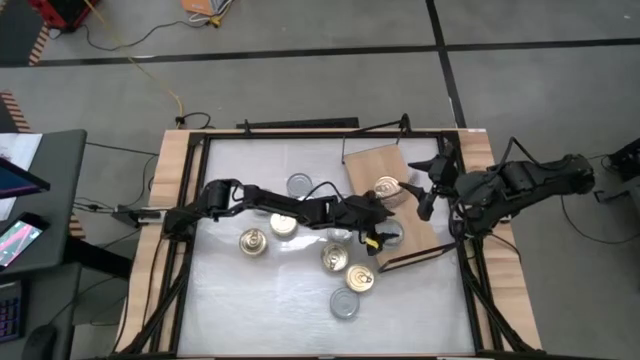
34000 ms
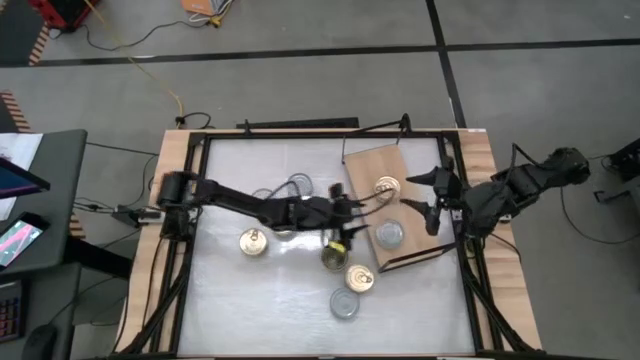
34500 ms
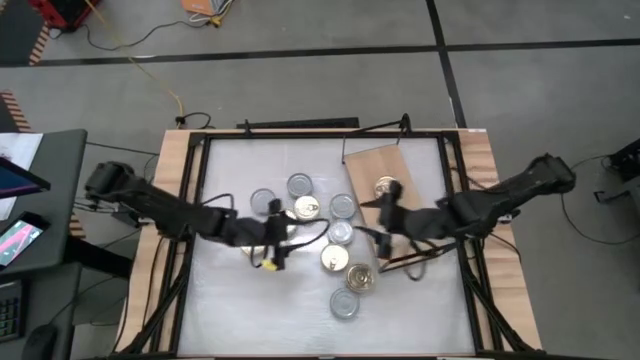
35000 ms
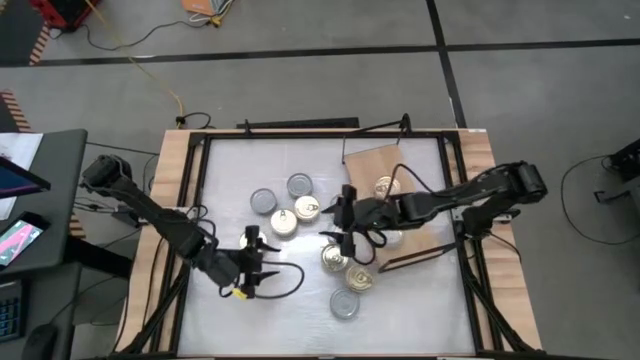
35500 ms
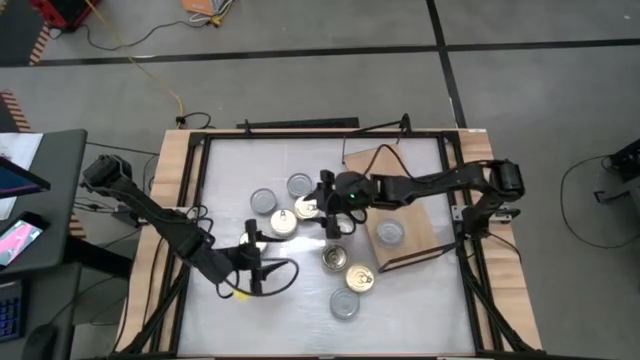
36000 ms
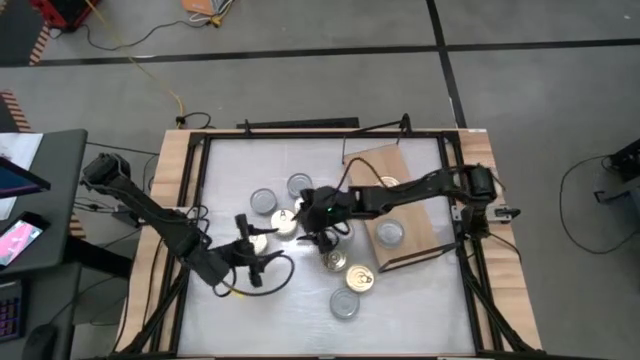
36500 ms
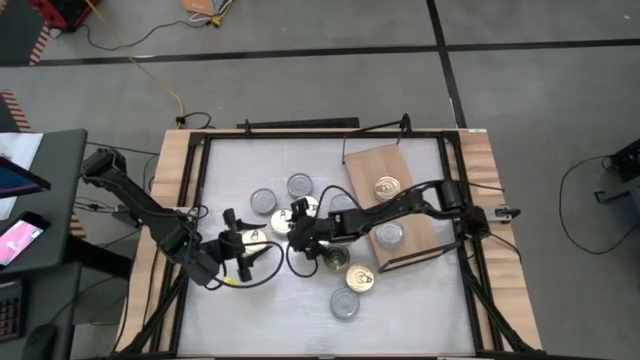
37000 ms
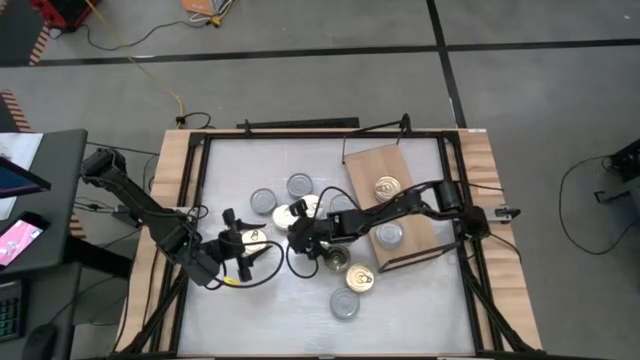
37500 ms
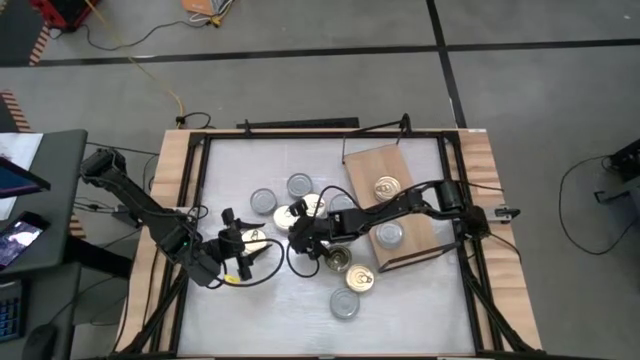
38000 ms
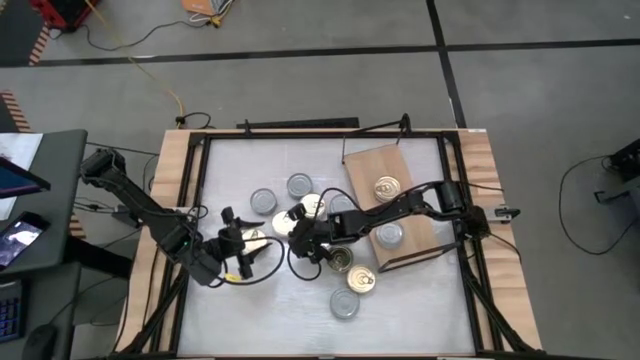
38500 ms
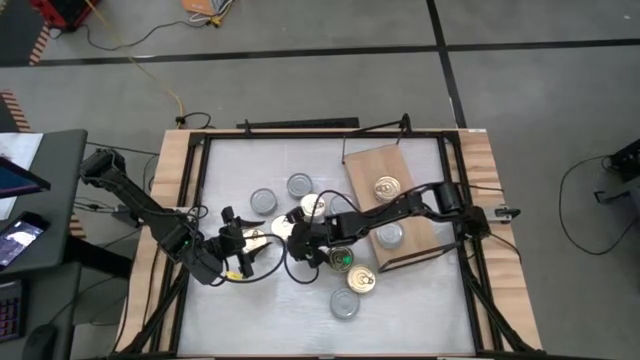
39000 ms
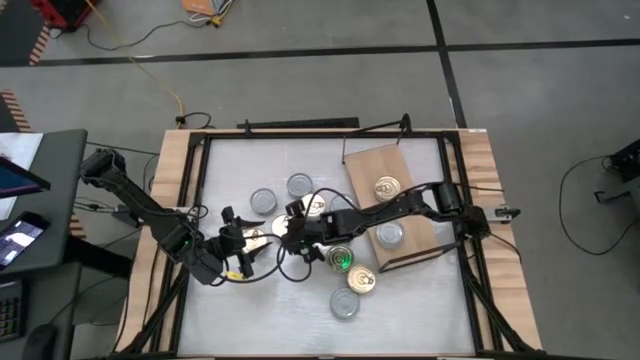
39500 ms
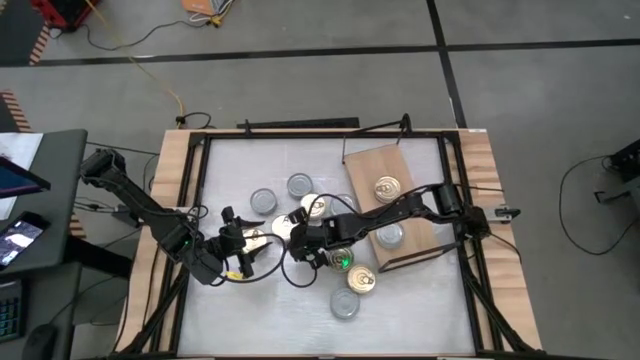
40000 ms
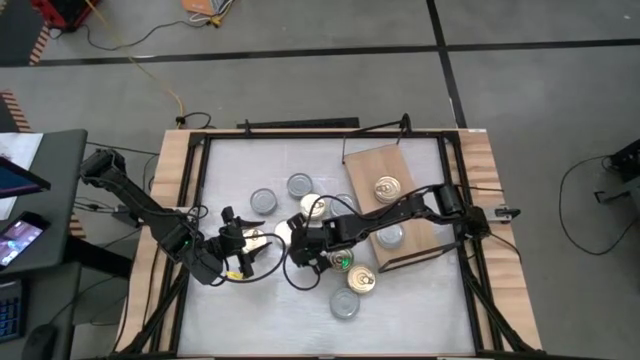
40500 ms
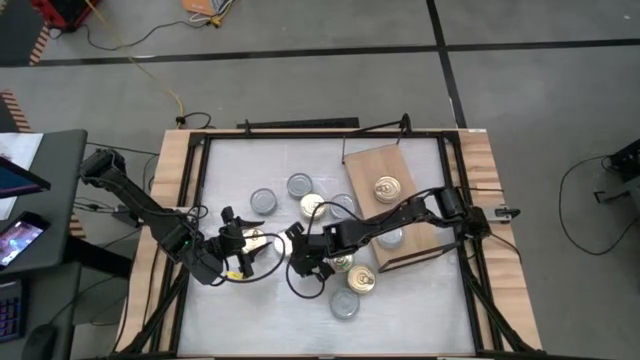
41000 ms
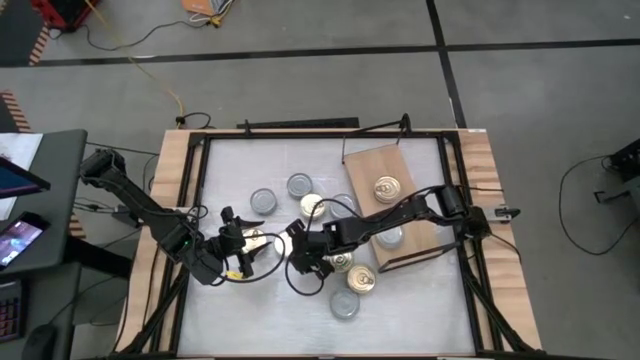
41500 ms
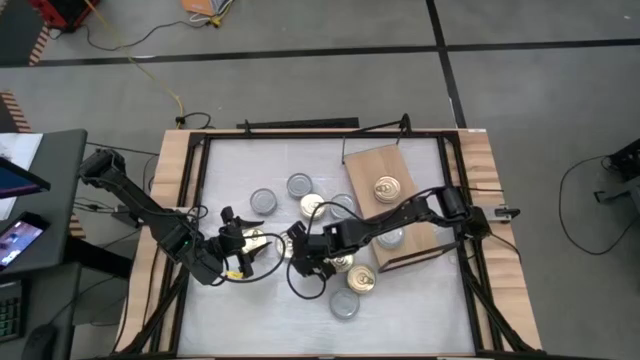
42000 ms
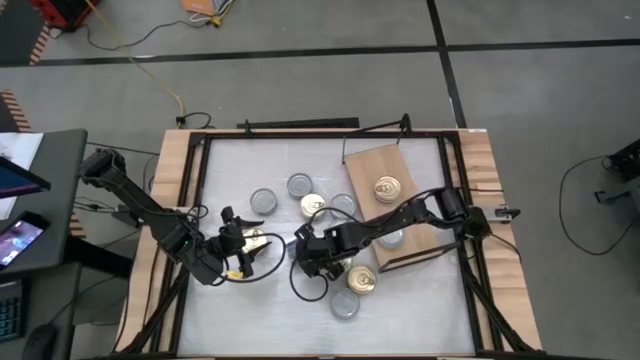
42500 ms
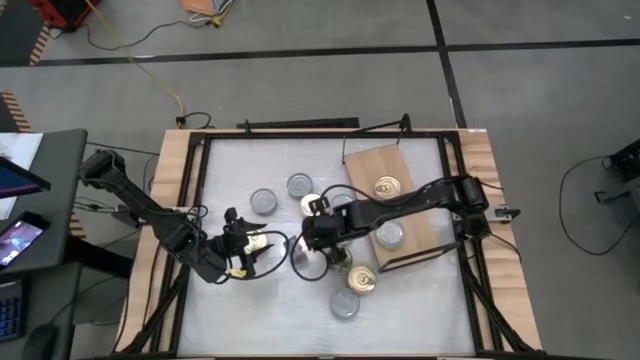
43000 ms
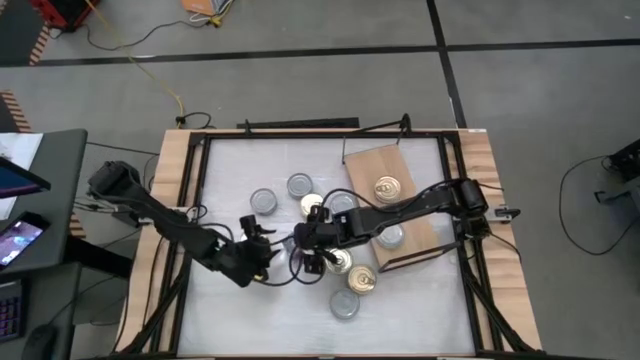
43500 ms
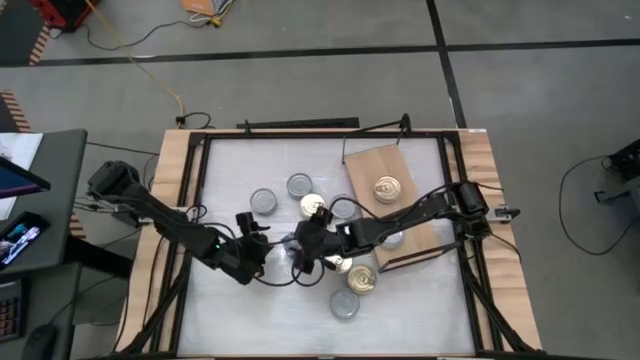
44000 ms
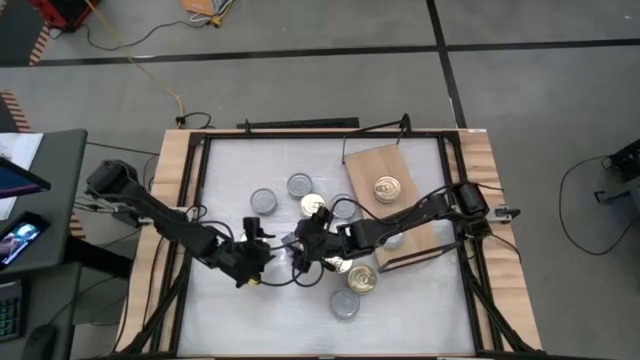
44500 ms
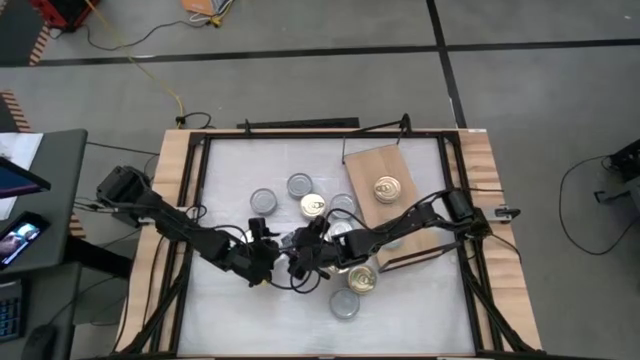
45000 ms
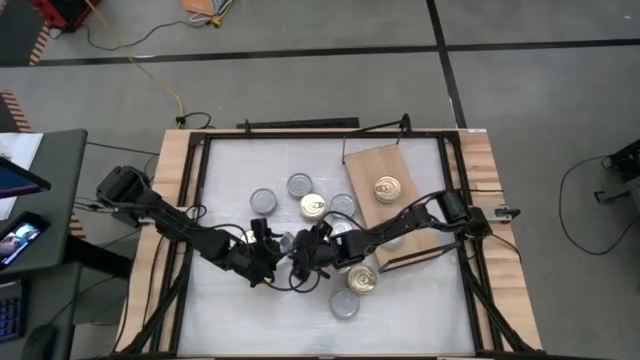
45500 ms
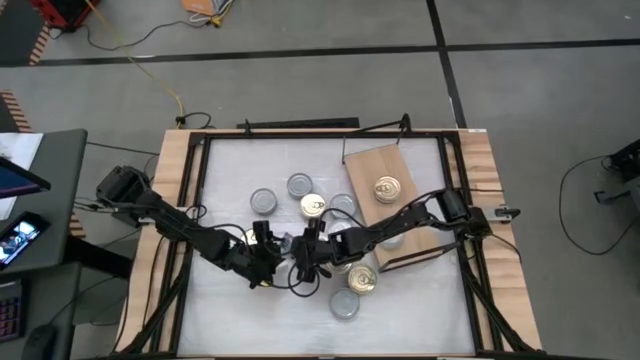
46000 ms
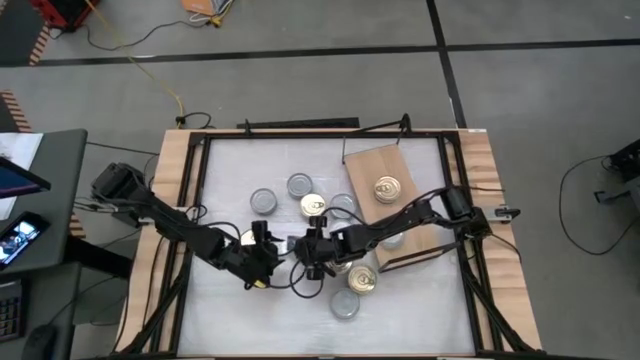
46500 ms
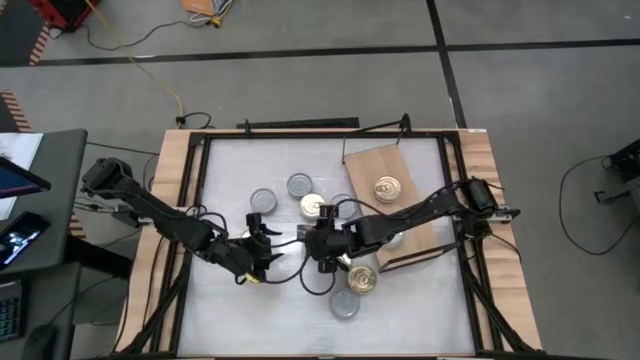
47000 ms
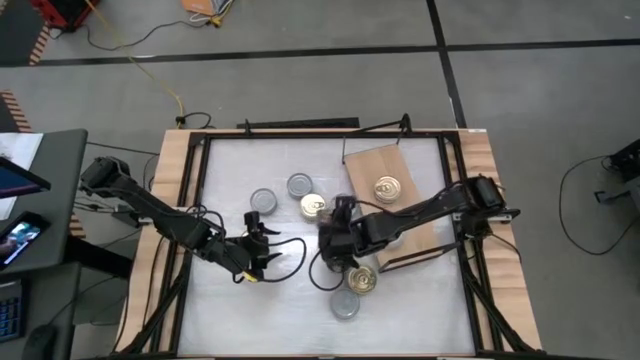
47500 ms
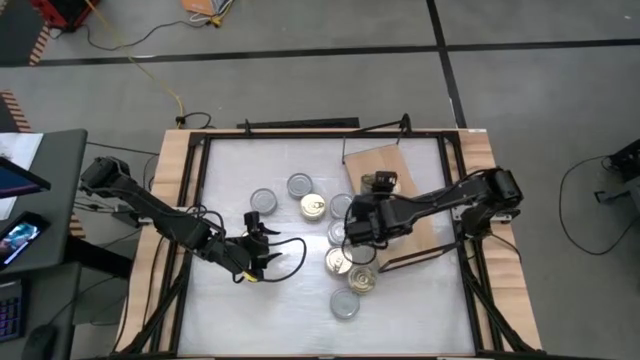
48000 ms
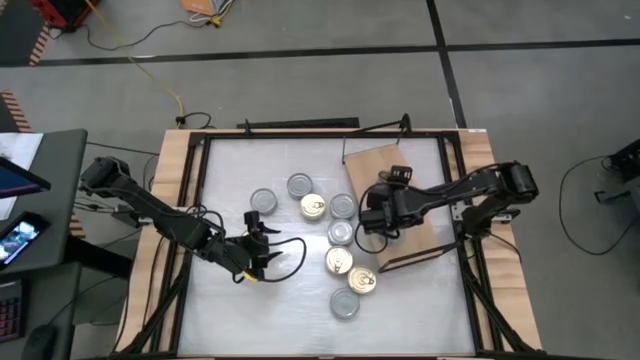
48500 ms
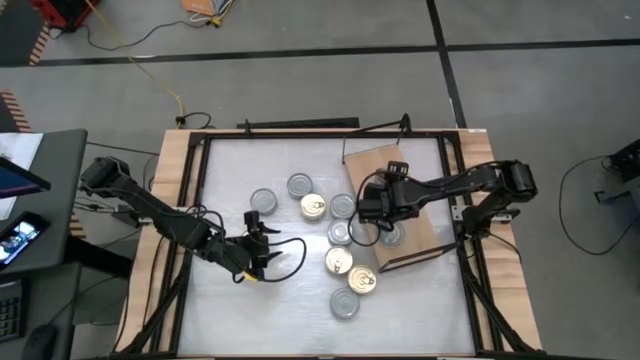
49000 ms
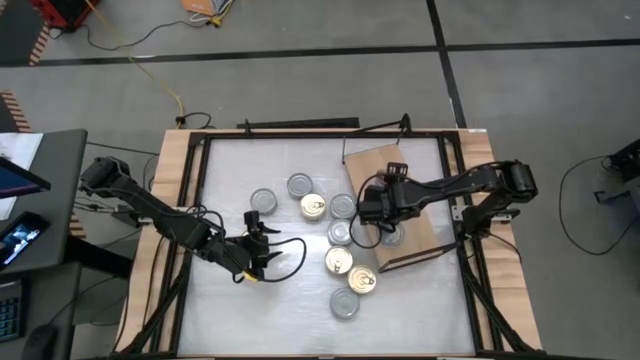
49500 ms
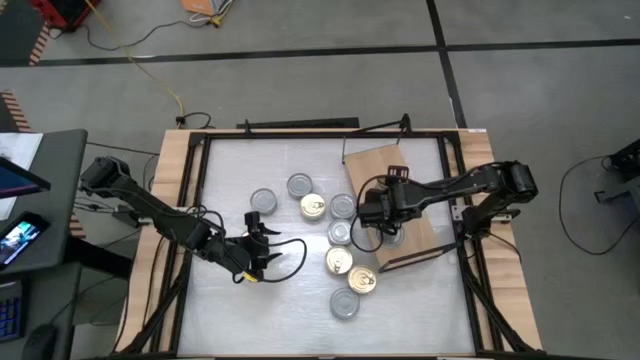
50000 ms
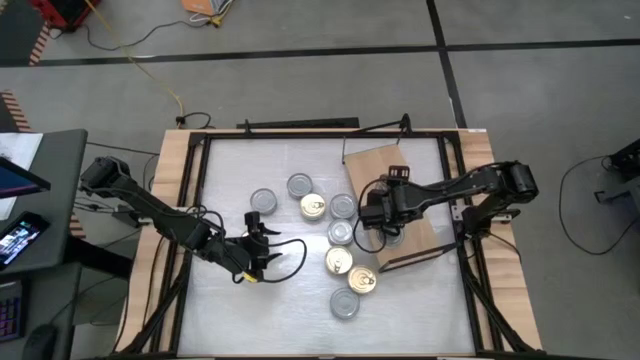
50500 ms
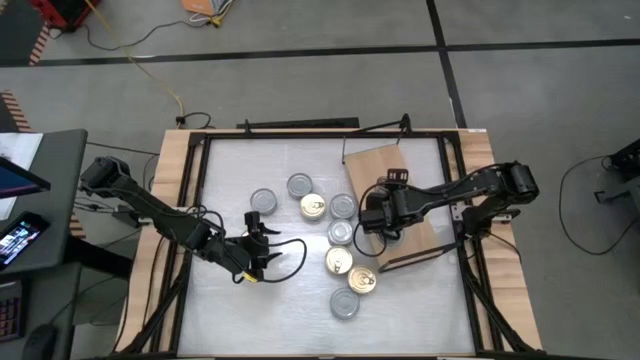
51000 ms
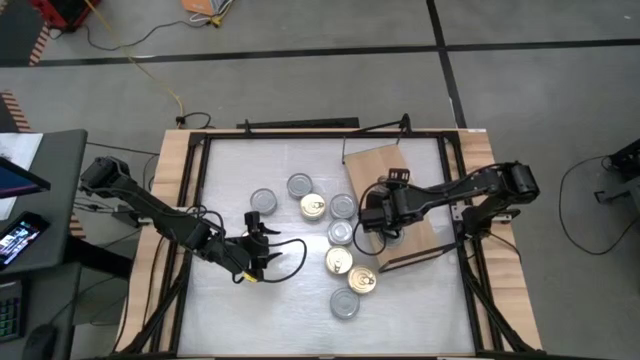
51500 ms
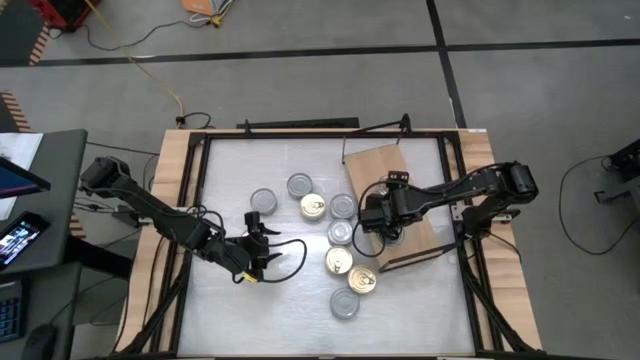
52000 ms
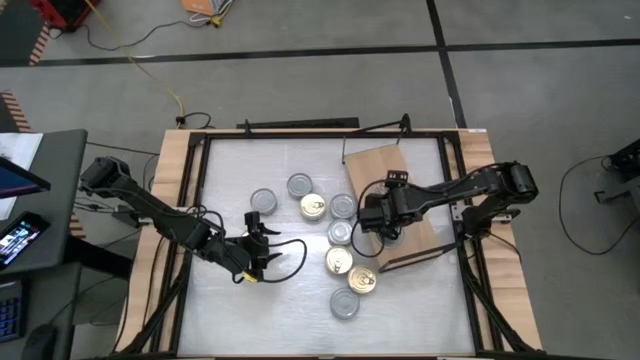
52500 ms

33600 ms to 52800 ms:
Task: Stack canned seafood by type on shelf
Stack the blue tuna can on top of the other blue tuna can on the shelf

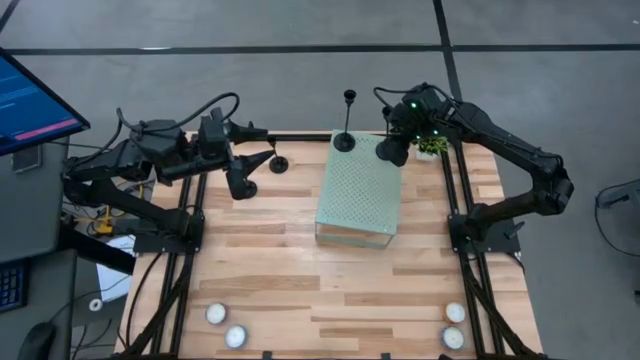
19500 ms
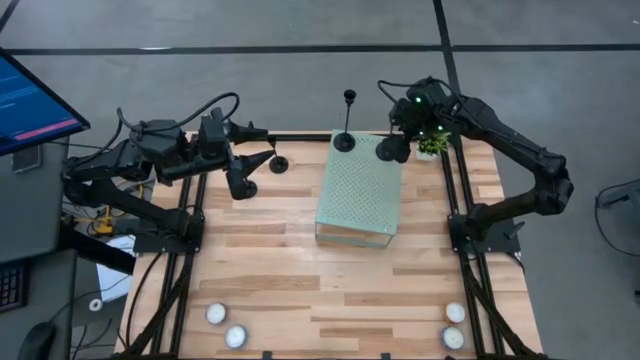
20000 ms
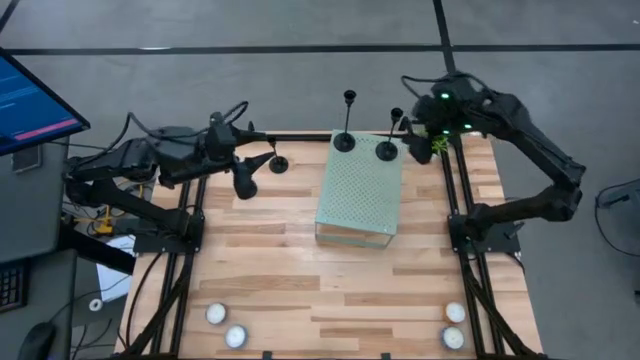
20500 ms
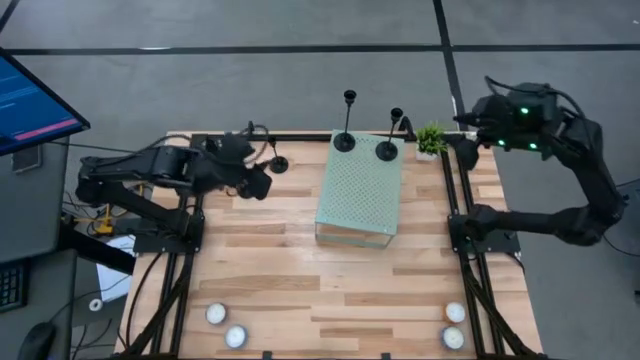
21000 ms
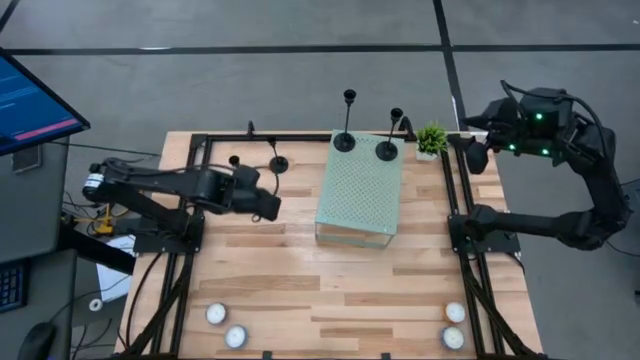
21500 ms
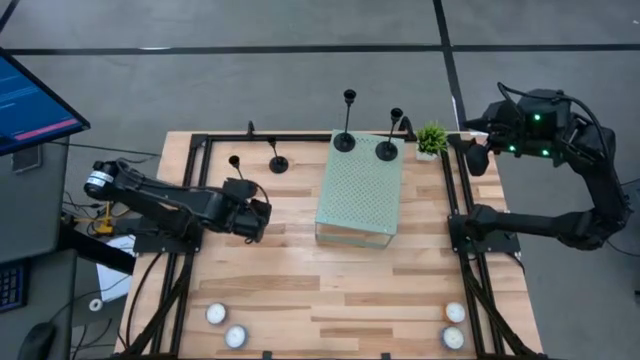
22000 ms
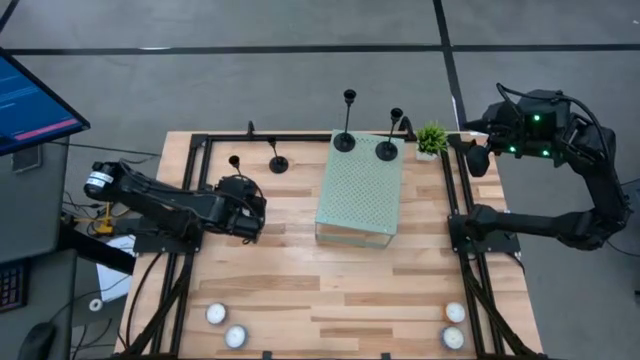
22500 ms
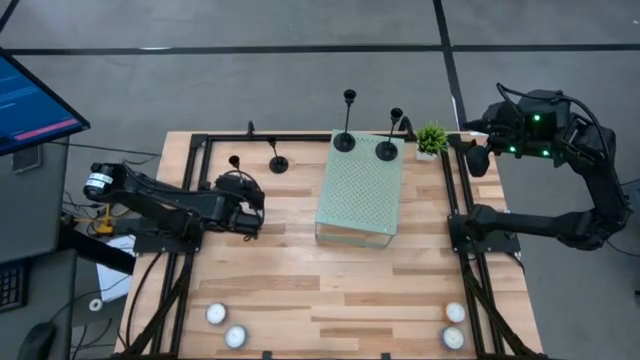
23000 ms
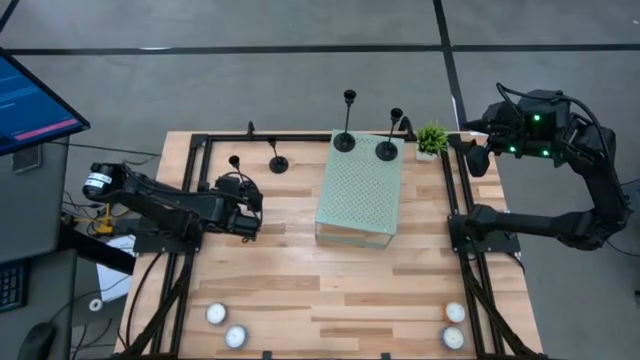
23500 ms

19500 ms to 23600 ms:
Task: Pick & Place candle stick holders
Put the black candle holder on the shelf
